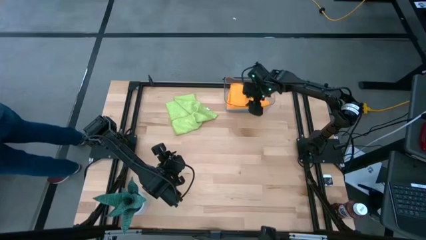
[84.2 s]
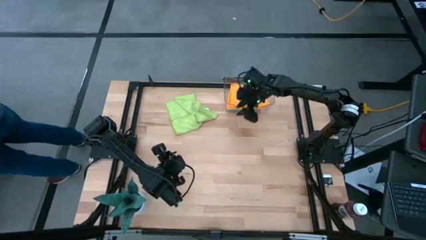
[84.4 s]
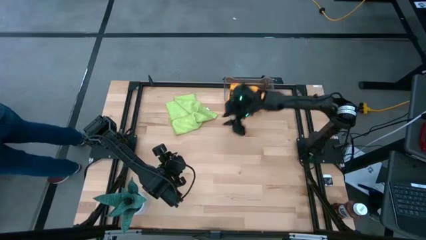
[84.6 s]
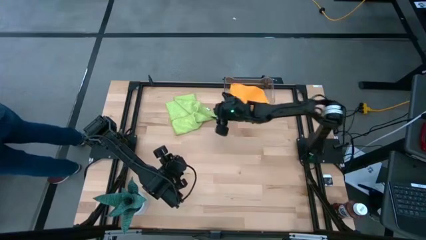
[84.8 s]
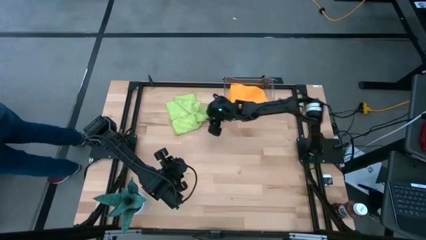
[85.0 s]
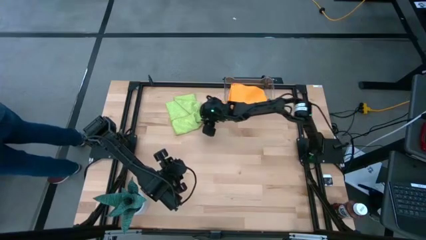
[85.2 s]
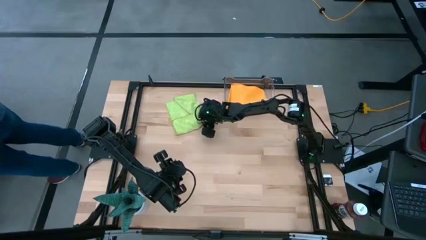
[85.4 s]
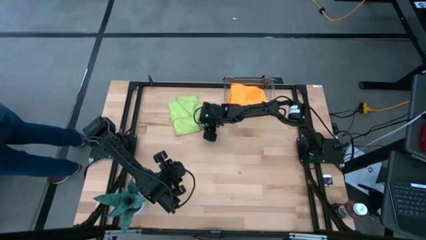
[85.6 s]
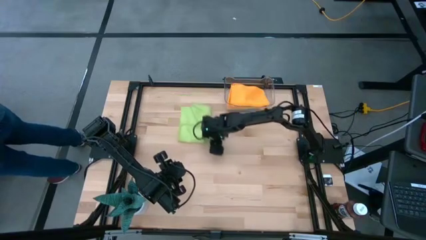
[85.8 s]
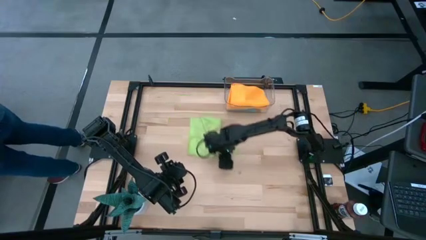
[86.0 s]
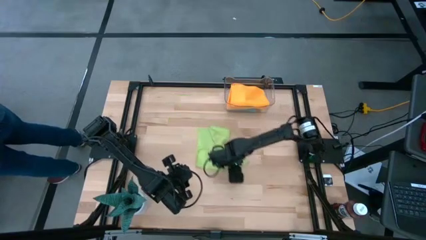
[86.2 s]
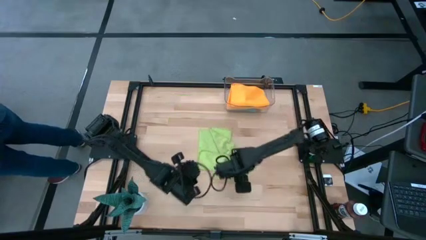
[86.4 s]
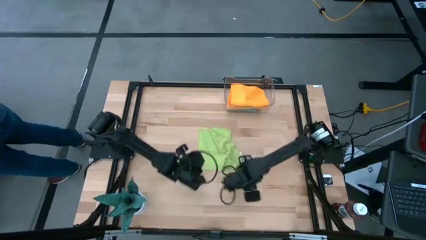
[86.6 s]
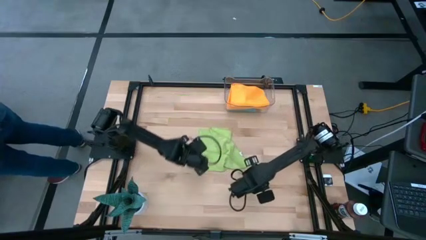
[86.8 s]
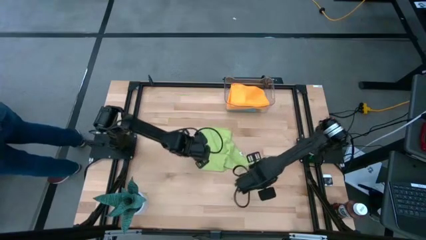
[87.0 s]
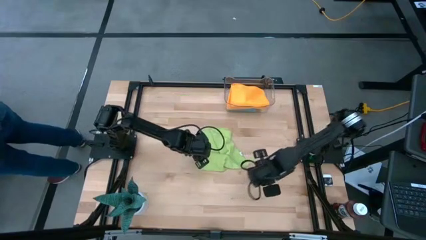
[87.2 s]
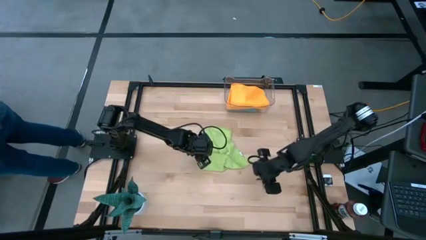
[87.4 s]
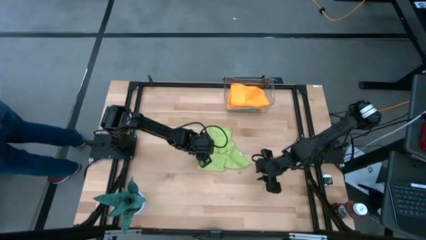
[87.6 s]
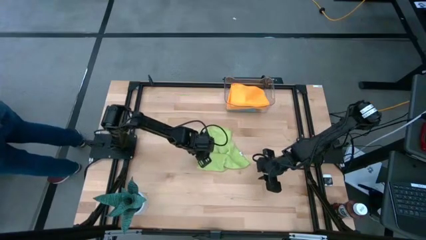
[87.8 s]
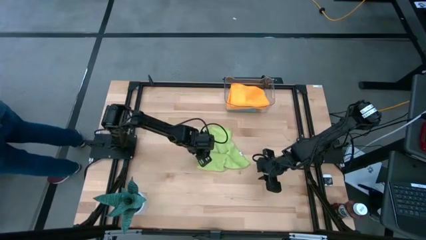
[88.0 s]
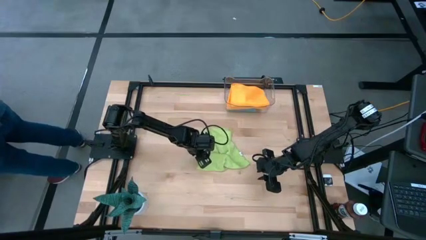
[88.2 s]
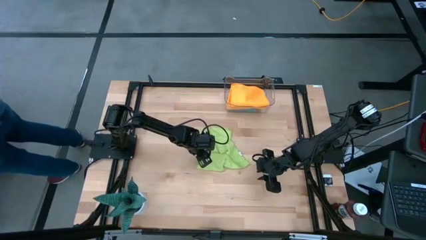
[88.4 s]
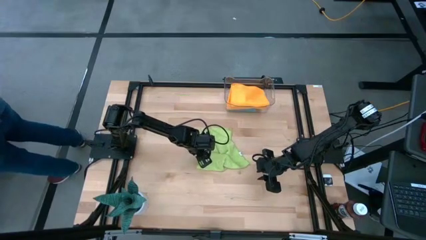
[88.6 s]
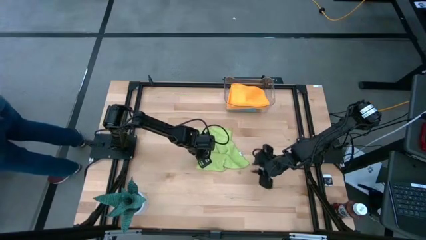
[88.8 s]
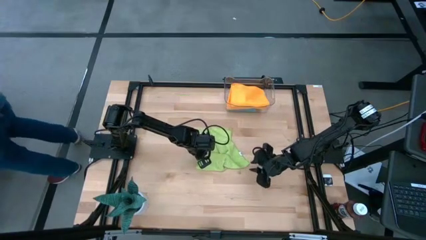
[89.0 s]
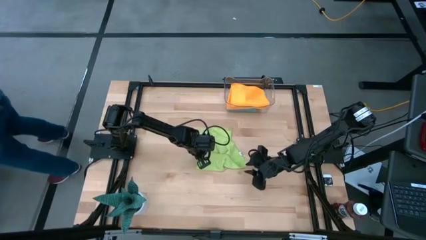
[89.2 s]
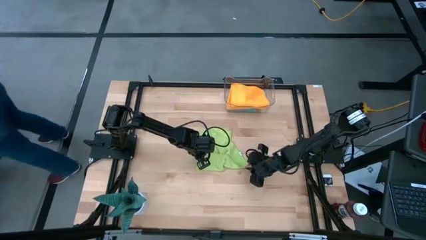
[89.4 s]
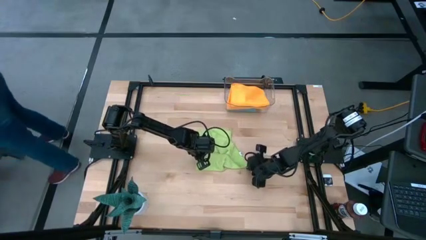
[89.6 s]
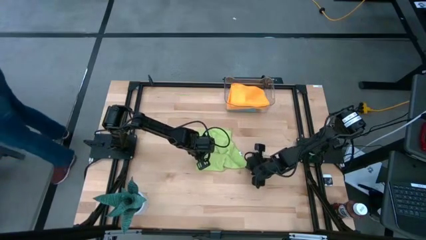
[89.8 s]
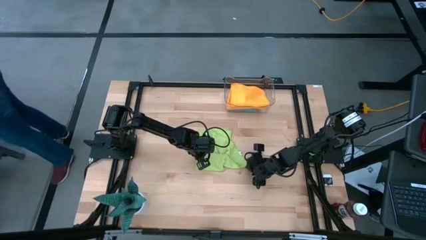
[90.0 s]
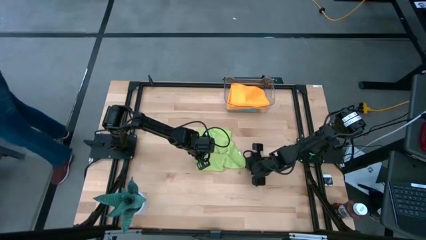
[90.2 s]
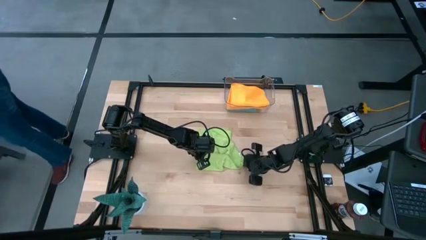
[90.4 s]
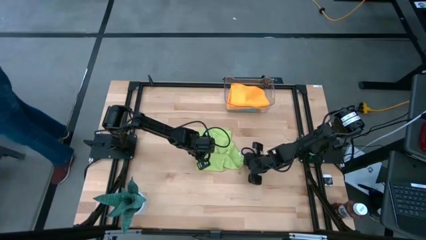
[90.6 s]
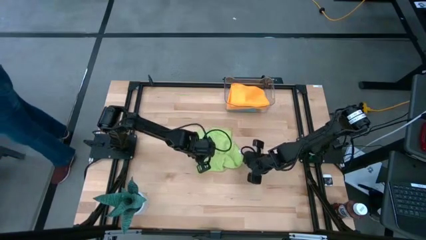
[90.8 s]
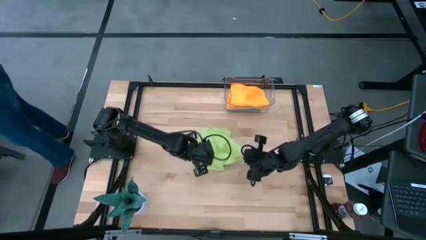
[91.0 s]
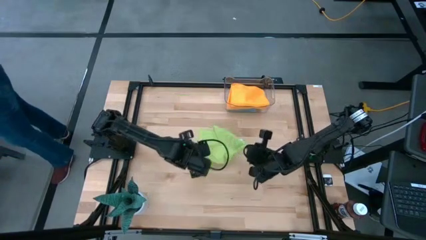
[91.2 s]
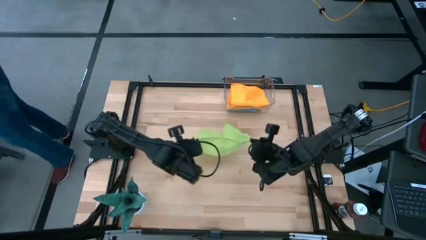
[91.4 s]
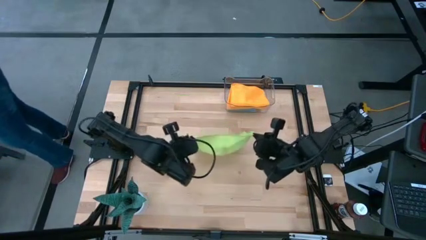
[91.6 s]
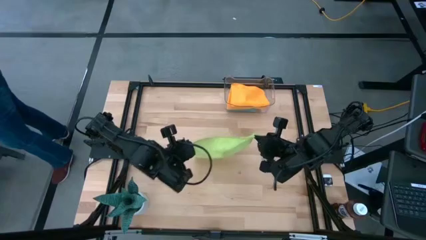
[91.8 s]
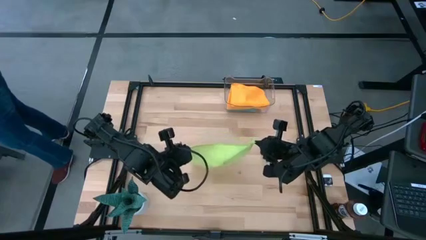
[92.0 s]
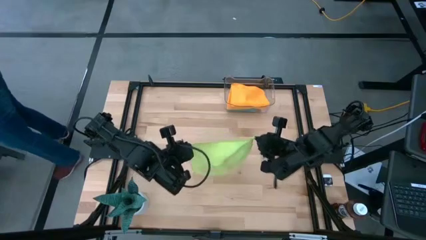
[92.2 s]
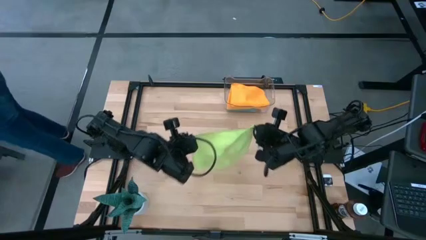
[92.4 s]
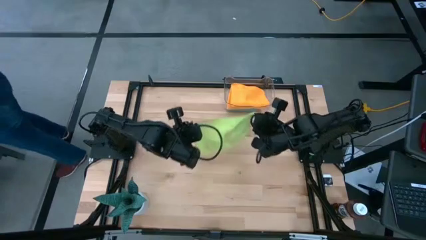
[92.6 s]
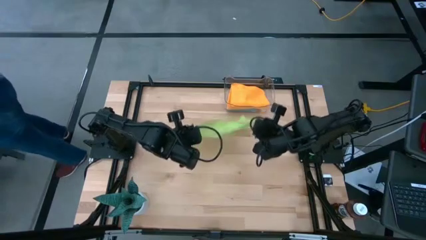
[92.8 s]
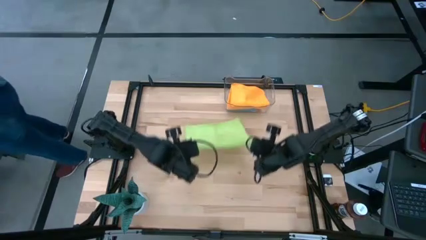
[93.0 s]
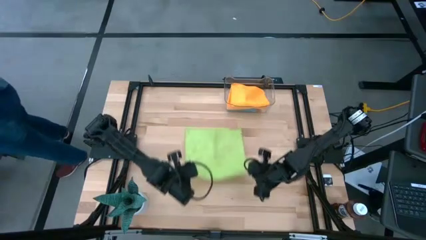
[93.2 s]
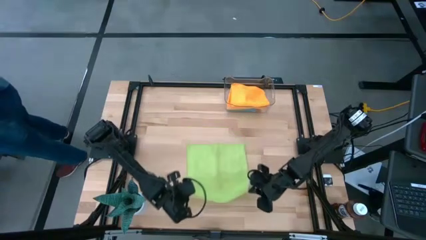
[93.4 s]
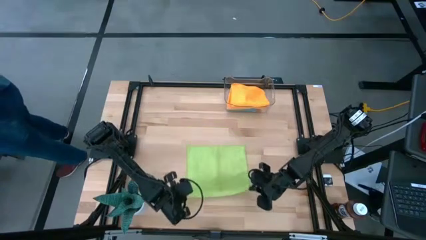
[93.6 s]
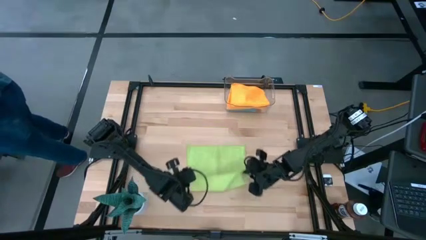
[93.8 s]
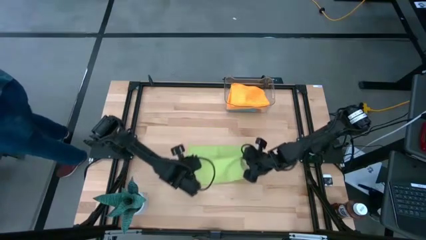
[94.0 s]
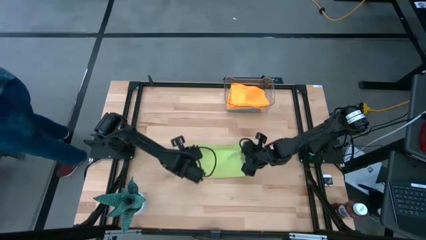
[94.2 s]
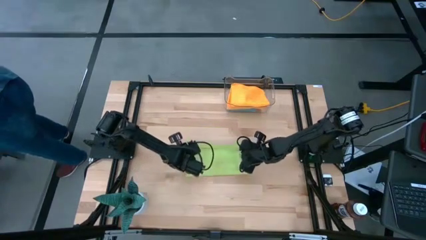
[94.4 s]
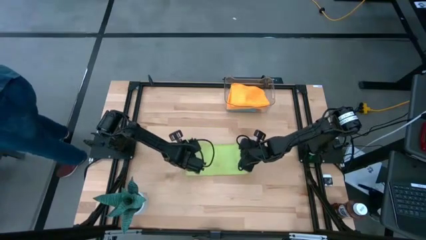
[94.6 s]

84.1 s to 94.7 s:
Task: Fold microfiber towels
Fold the green microfiber cloth

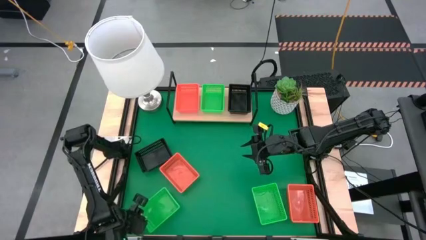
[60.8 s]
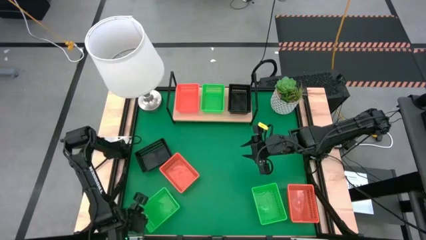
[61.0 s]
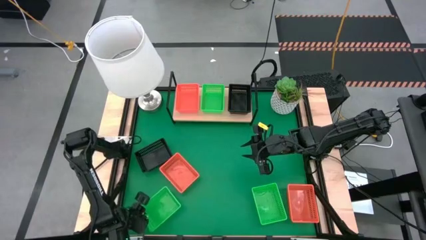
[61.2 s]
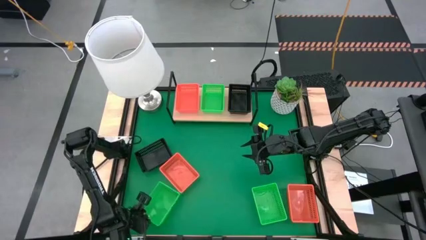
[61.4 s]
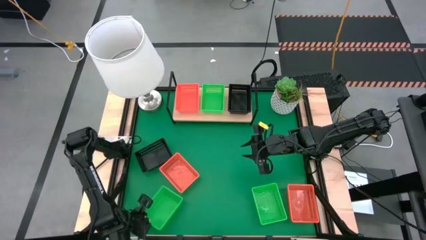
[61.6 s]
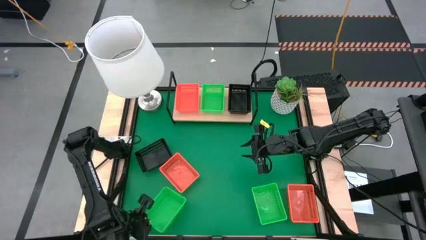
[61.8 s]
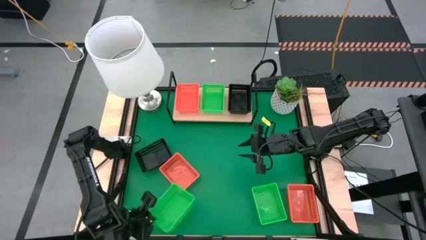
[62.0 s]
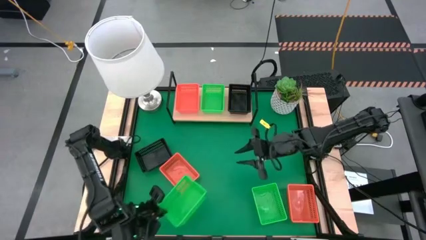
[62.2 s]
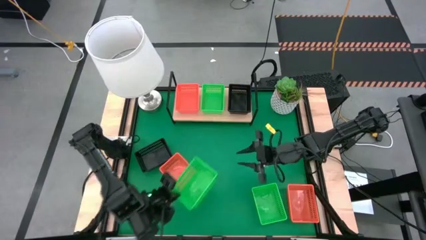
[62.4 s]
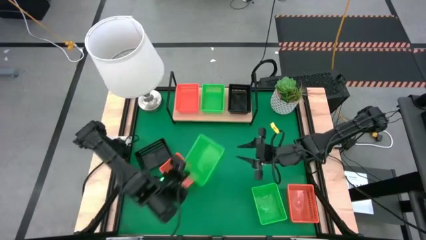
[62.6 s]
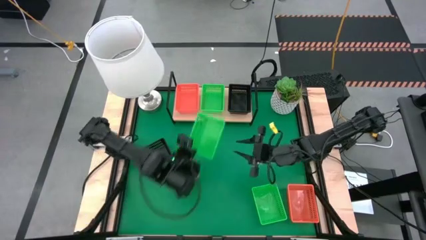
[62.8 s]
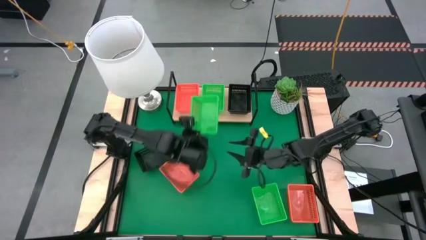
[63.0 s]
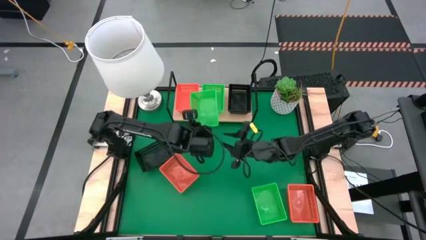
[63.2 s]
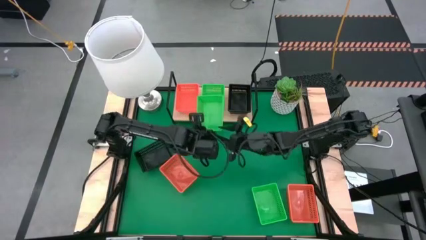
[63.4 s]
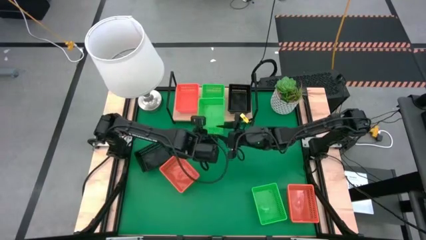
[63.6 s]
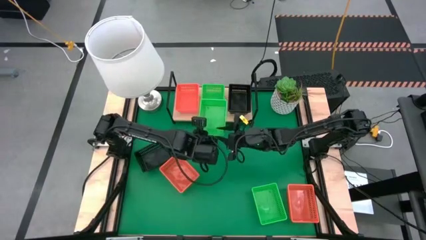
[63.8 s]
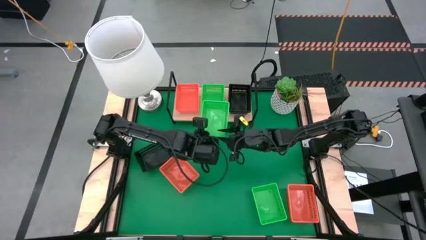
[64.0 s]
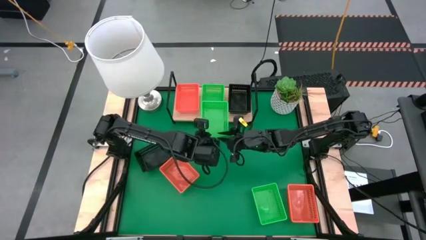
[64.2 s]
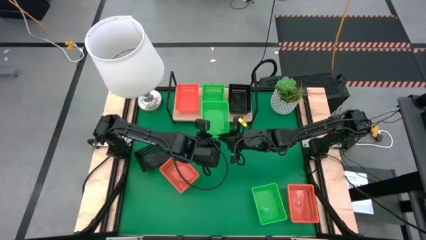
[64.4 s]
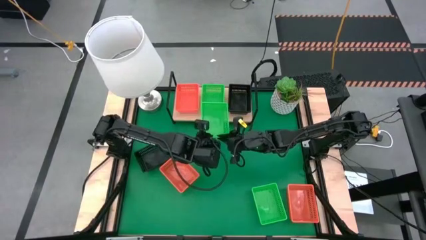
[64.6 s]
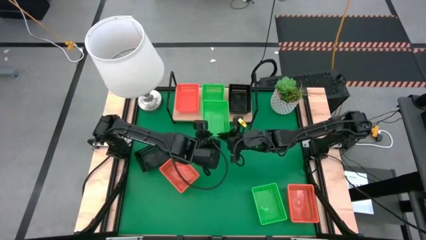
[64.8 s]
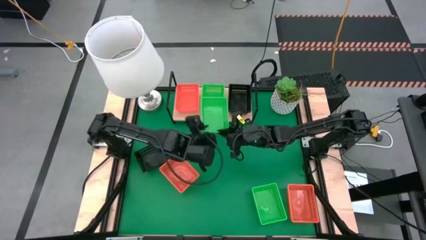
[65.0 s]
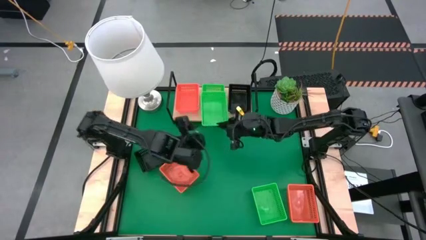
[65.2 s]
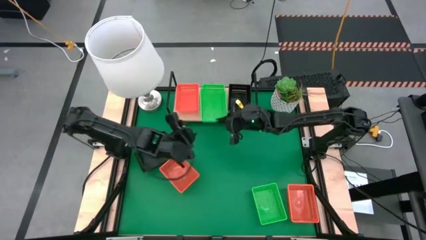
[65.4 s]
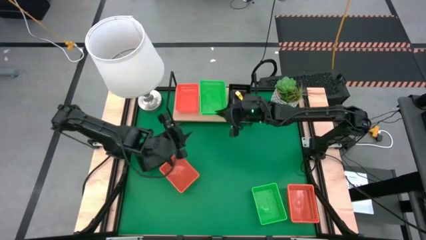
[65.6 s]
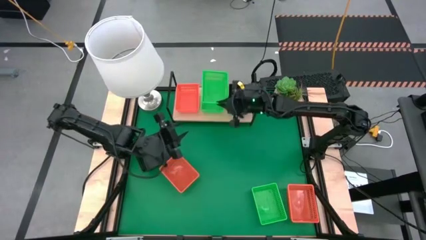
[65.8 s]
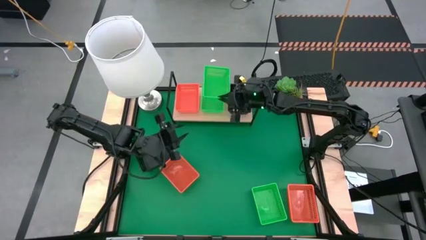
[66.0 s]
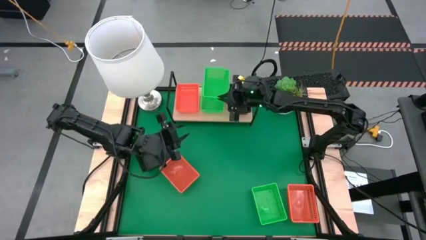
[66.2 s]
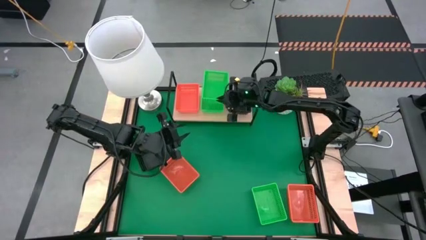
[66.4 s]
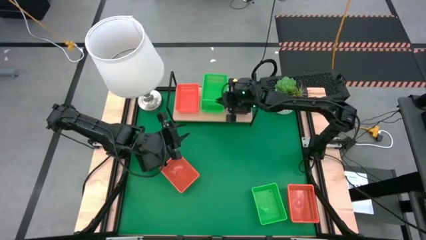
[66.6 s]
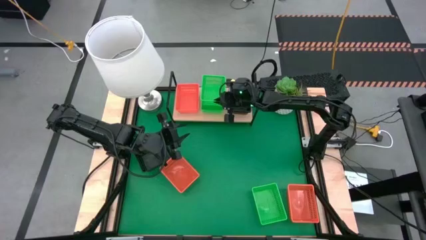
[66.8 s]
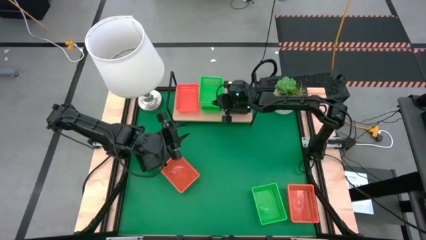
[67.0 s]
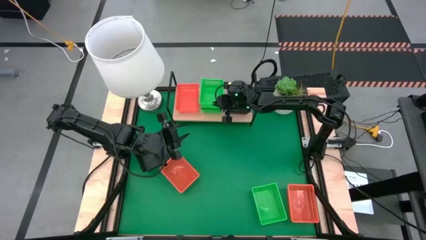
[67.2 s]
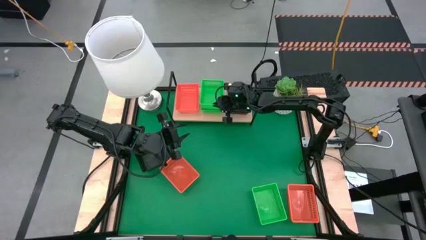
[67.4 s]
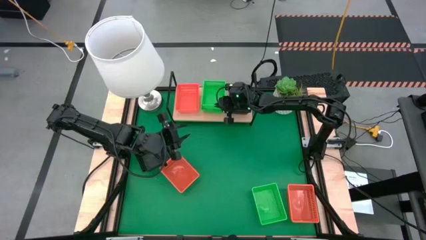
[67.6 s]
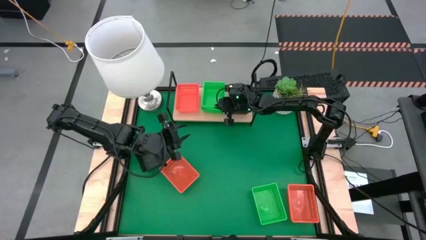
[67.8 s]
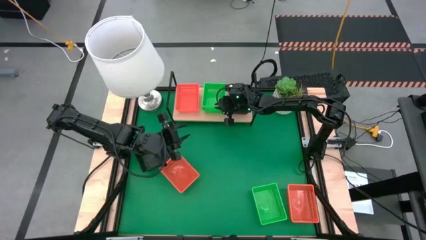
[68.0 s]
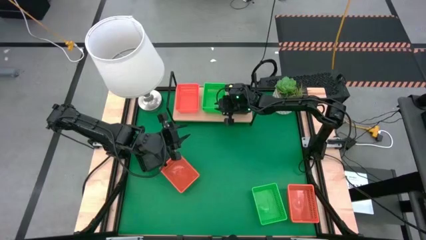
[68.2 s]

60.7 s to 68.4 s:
Task: Stack baskets on shelf by color
Stack the left green bin on the green bin on the shelf
